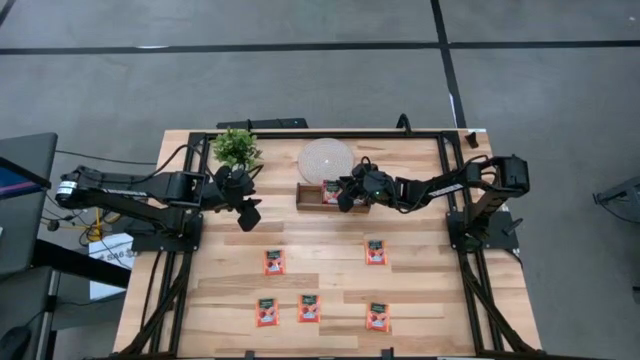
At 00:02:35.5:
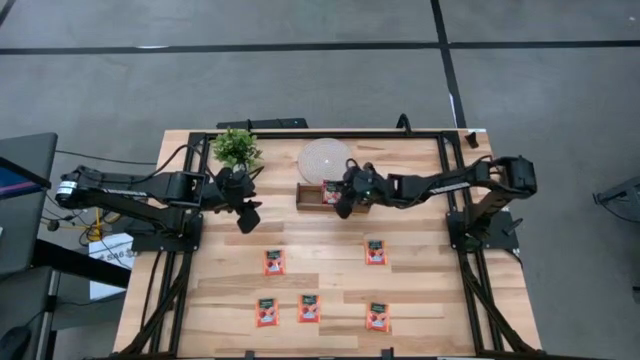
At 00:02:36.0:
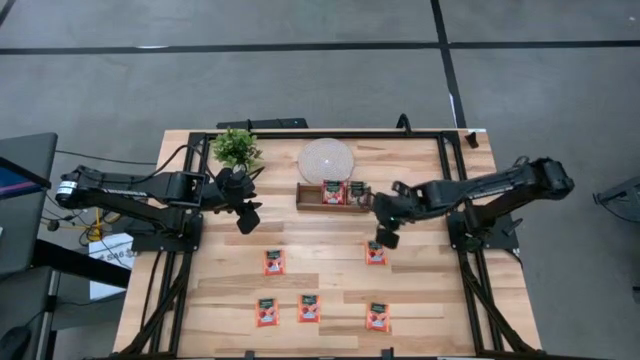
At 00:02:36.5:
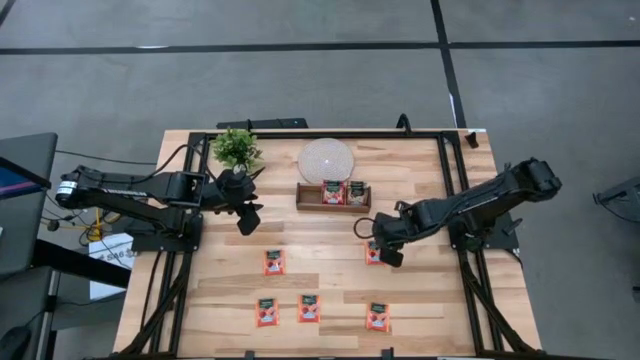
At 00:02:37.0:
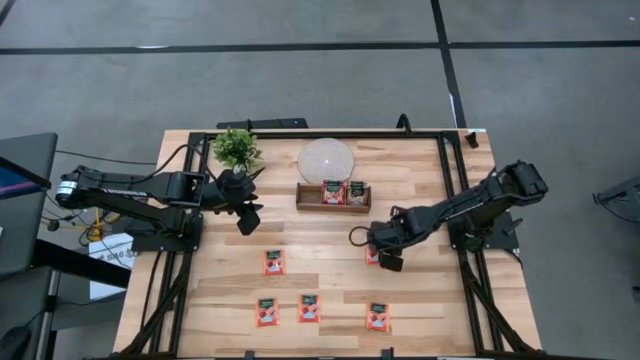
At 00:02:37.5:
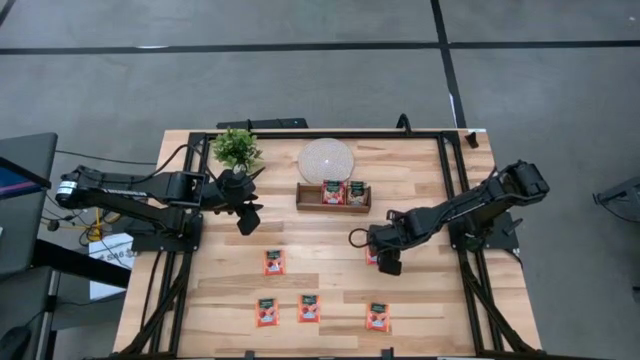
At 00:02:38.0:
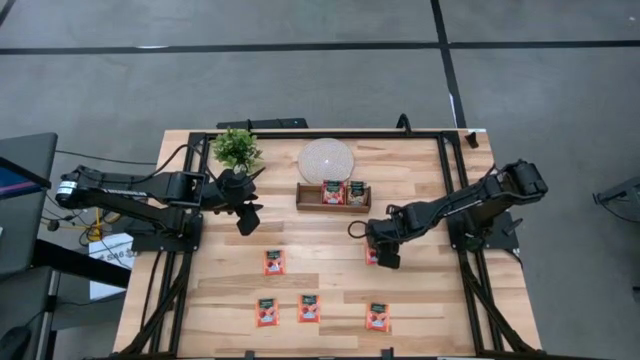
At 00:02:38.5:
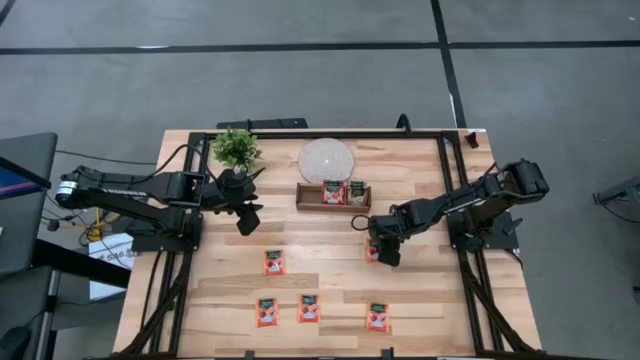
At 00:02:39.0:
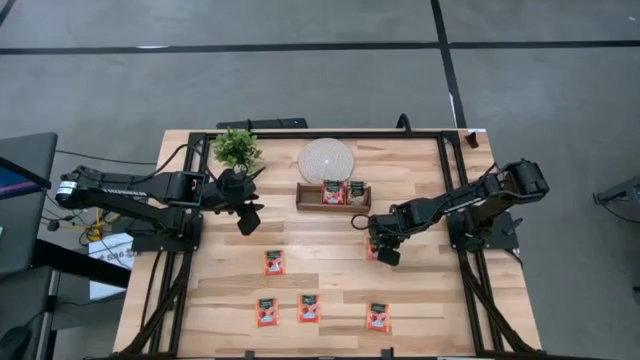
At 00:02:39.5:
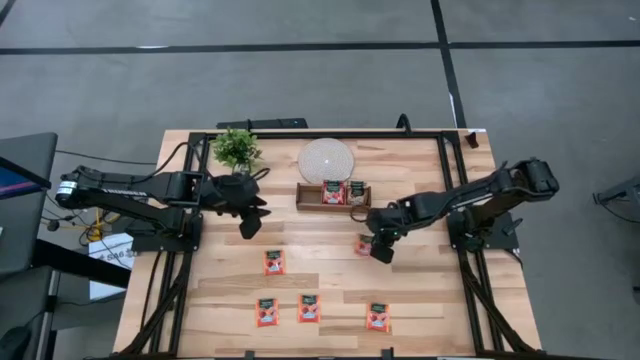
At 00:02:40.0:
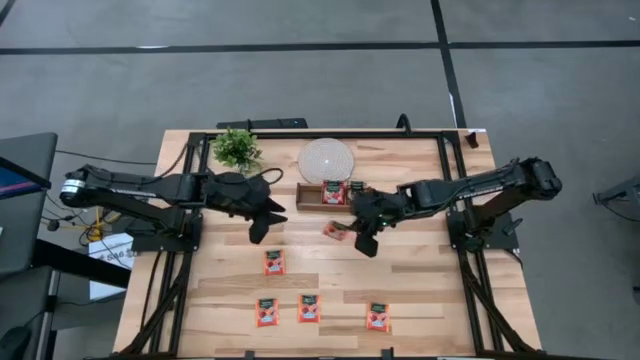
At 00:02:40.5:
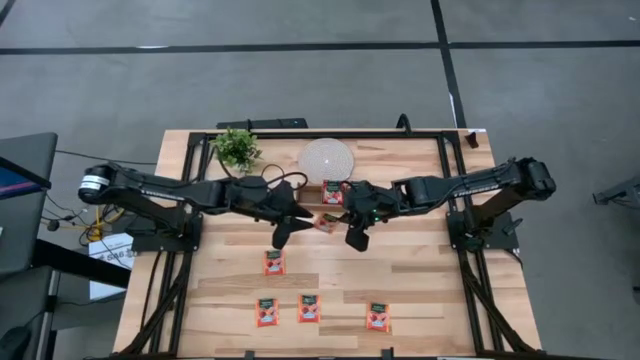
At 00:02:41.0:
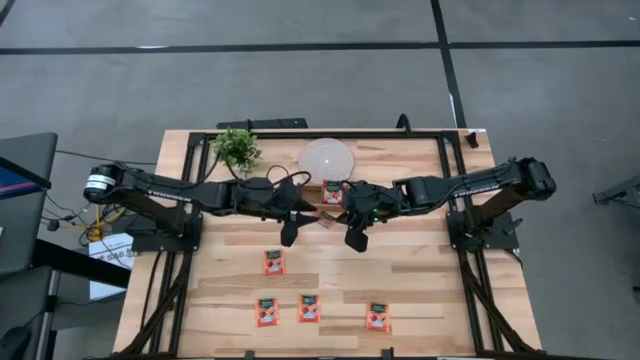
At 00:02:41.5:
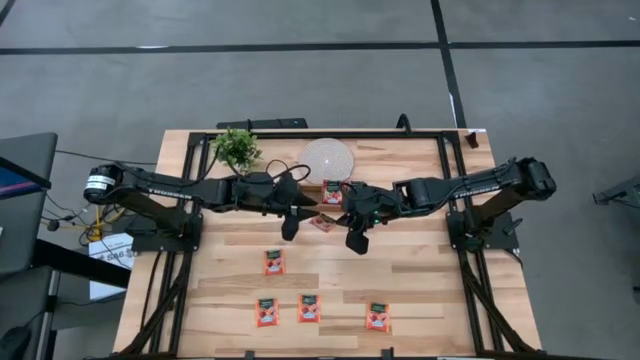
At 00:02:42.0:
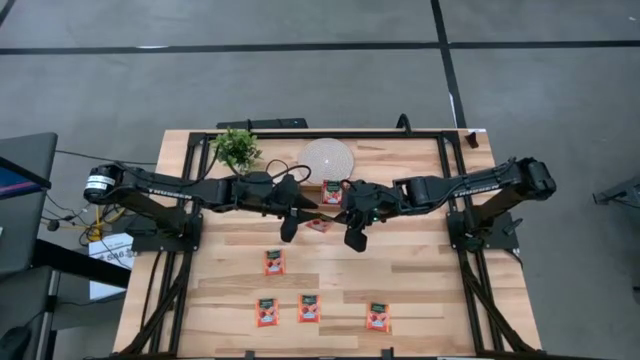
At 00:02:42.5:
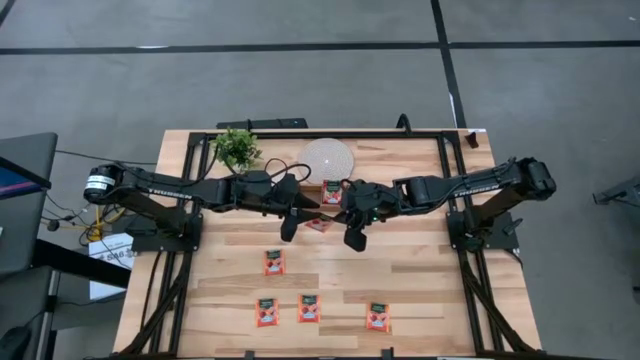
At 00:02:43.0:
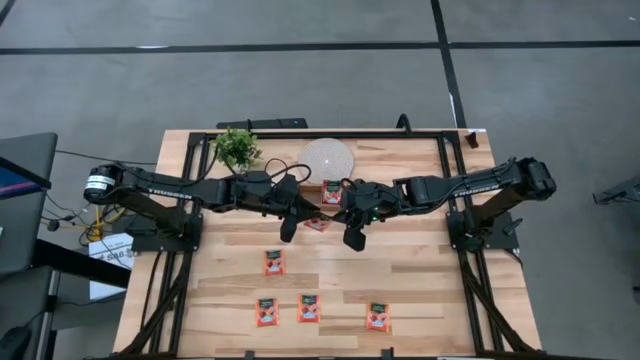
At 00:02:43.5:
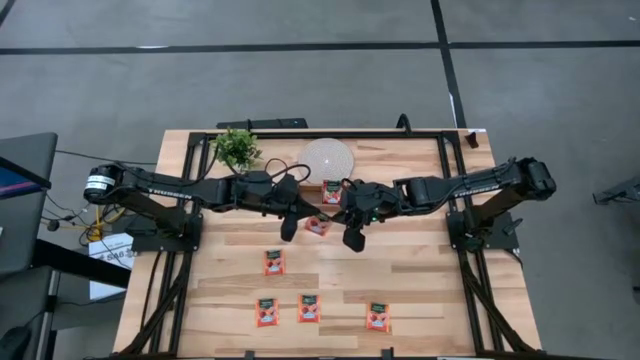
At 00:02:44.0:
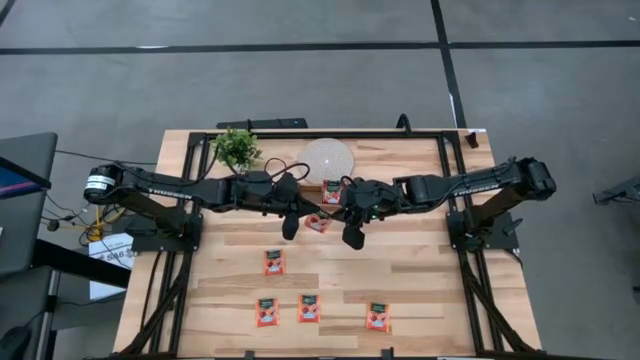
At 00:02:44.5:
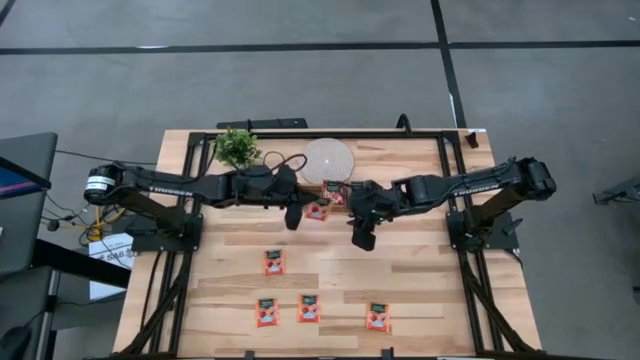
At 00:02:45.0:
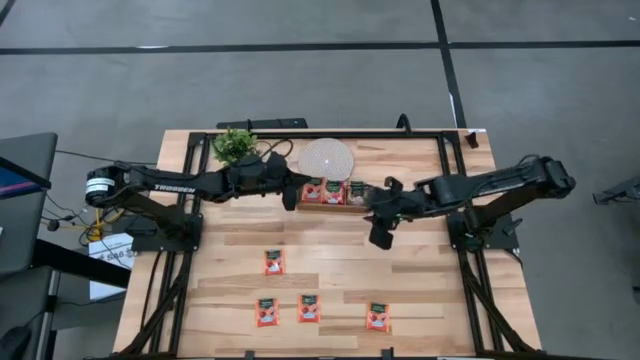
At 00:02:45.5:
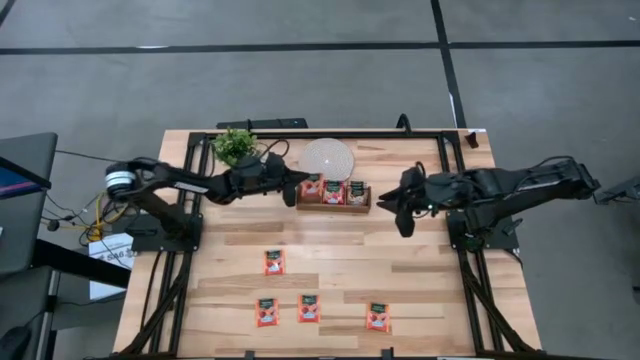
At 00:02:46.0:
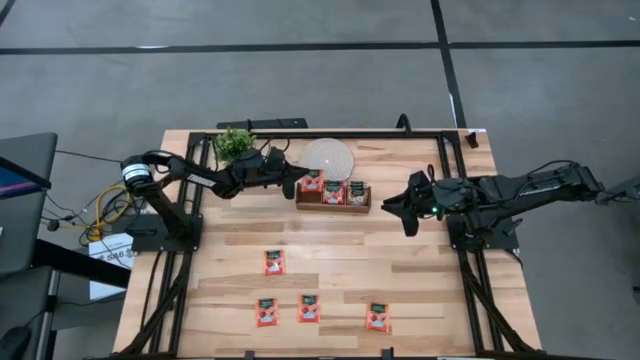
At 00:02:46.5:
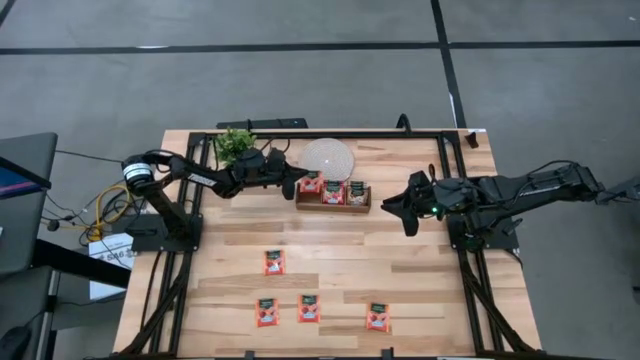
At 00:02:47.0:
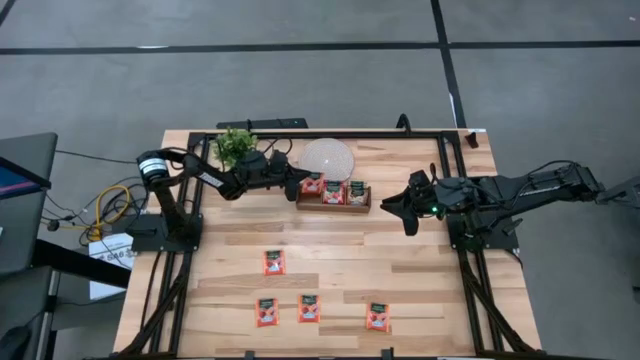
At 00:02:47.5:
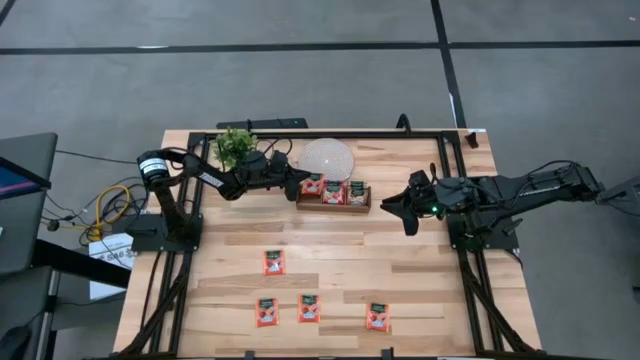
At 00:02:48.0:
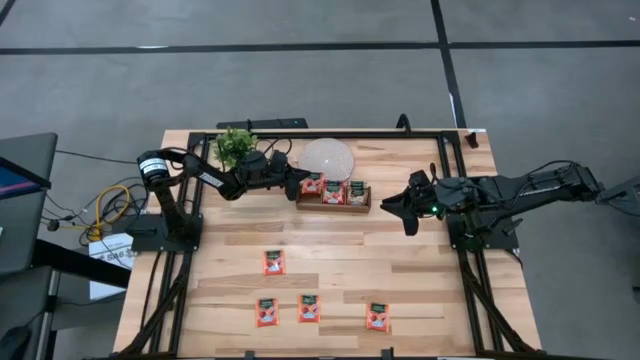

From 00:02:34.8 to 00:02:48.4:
Task: Pick & Place Tea
Put the orange tea bag into the left section of the wooden organizer

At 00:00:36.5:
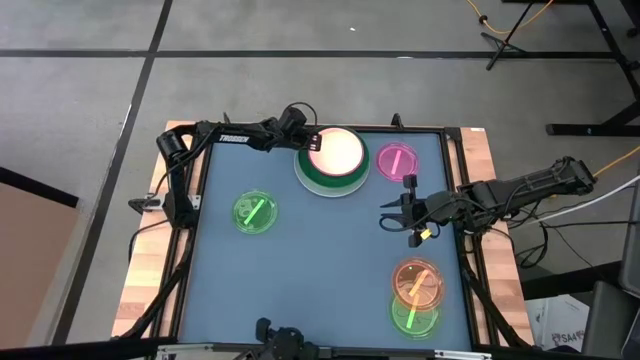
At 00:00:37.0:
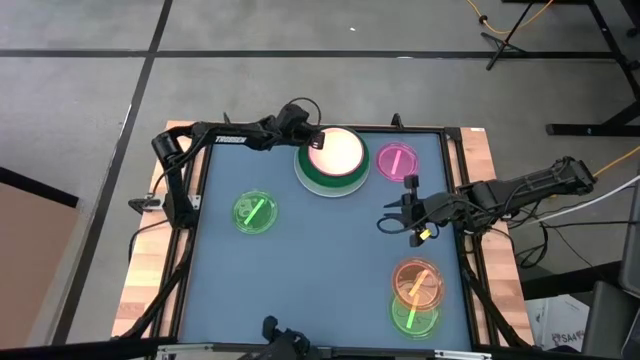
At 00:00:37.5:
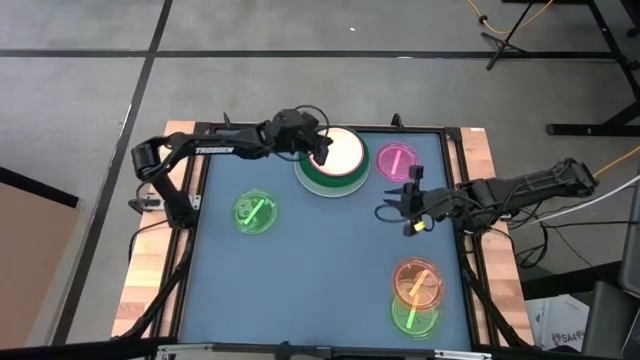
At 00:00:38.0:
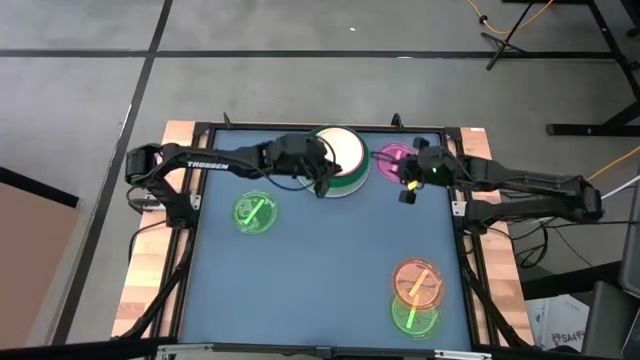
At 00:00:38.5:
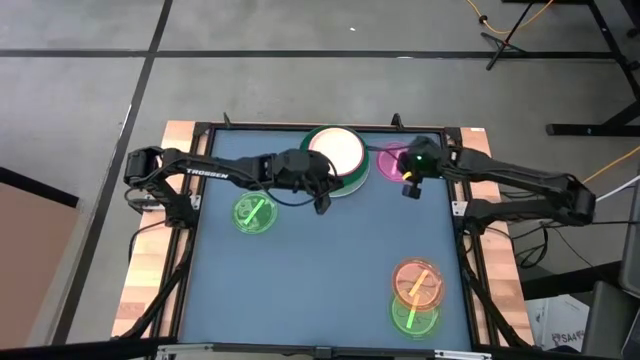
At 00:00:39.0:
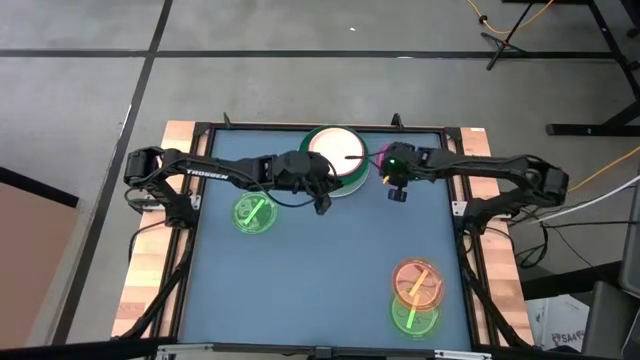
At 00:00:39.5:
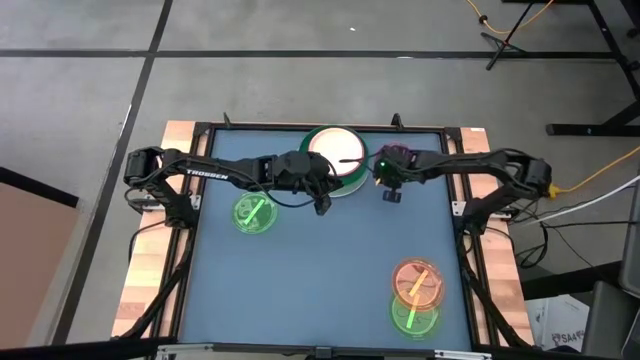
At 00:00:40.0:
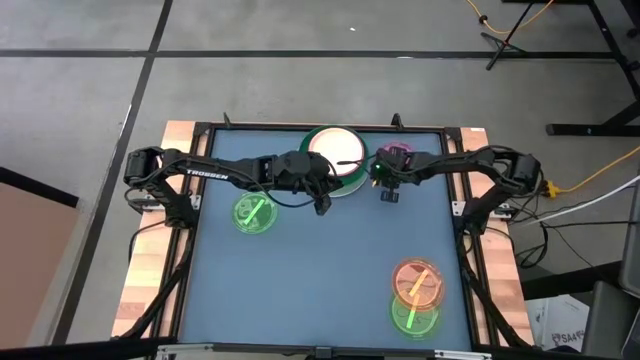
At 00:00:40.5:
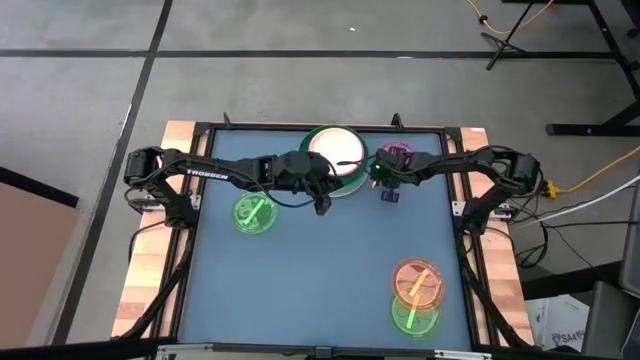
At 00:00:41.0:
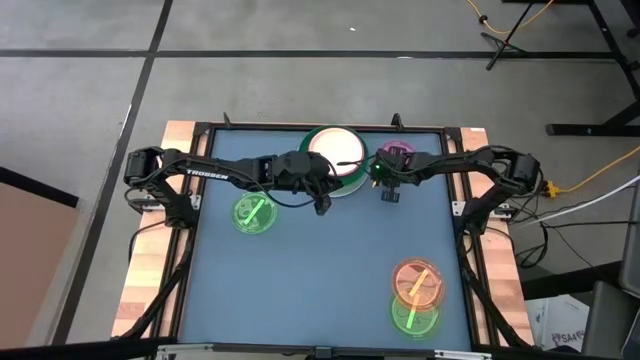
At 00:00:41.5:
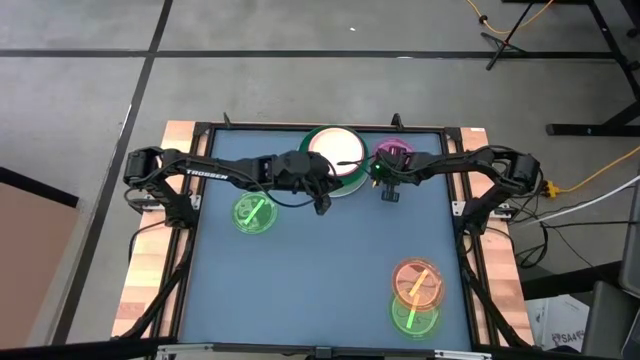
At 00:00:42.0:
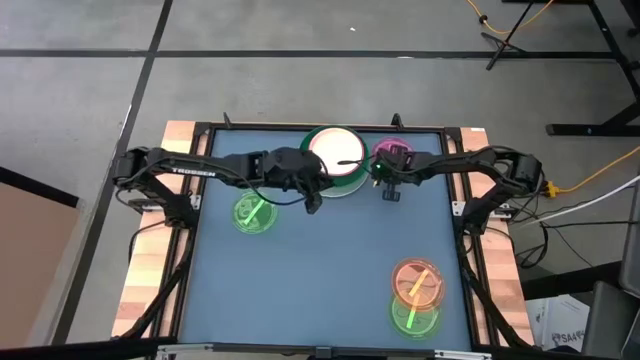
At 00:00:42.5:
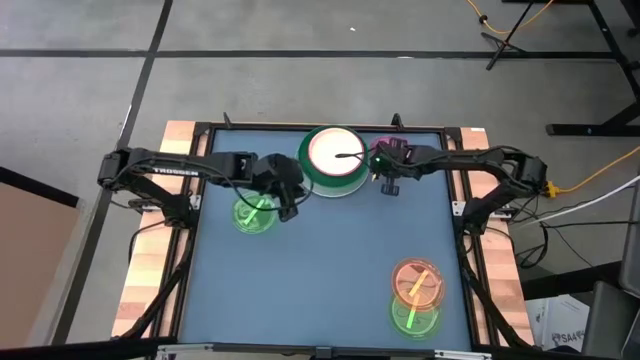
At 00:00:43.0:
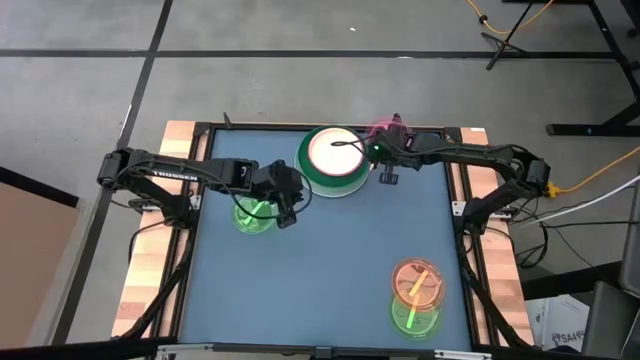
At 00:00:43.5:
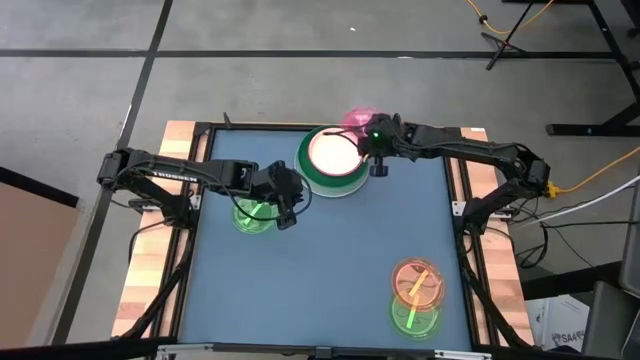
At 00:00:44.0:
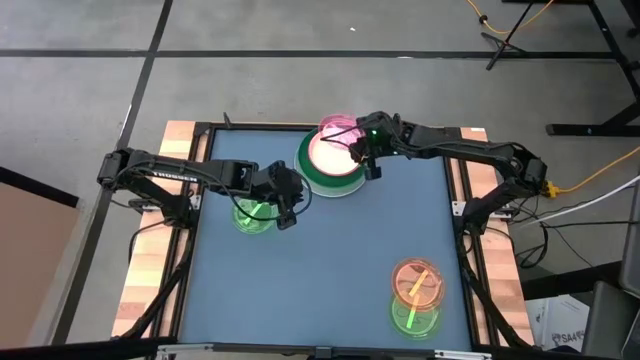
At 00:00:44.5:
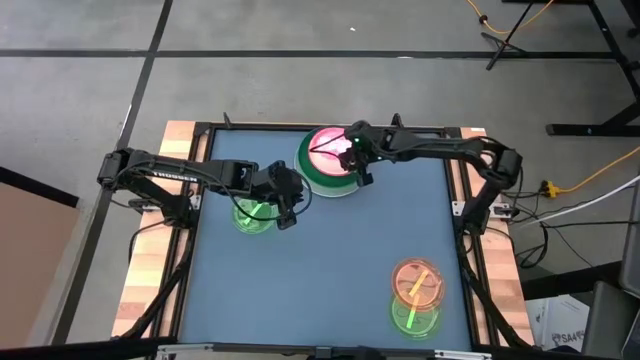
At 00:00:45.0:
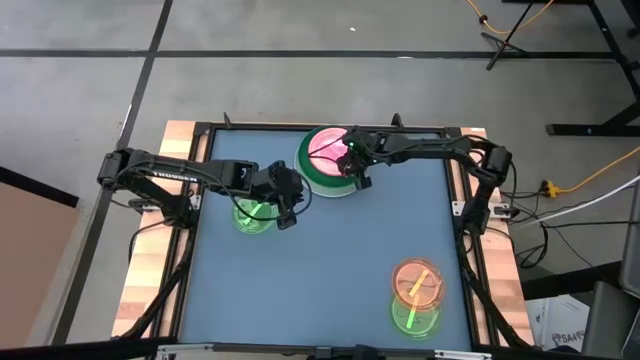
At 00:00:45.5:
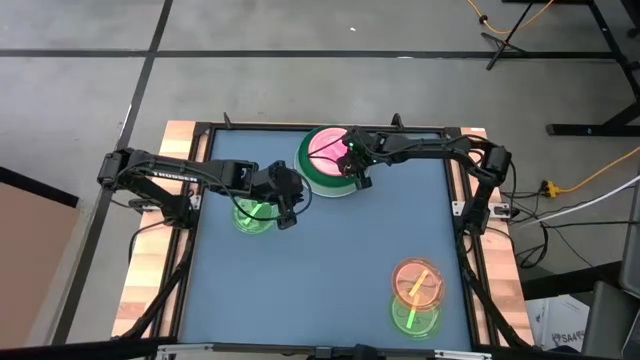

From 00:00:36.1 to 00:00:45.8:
Task: Stack plastic plates
Stack the light pink plate on top of the white plate
